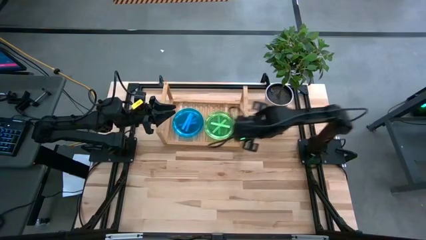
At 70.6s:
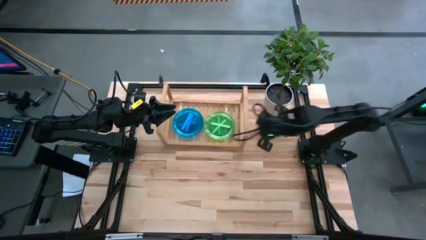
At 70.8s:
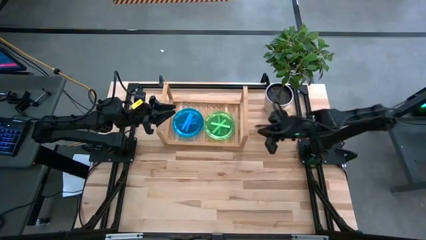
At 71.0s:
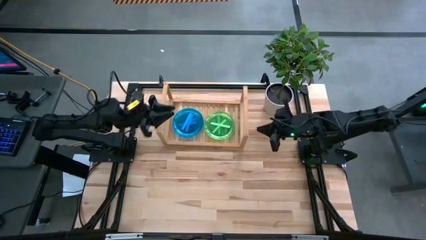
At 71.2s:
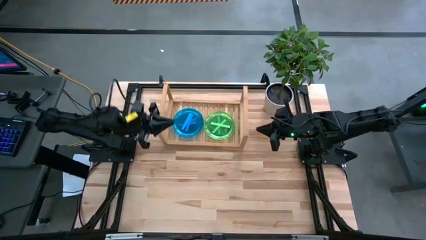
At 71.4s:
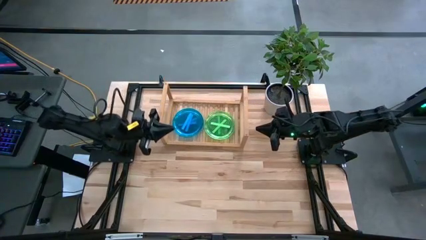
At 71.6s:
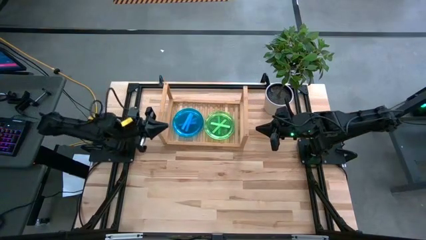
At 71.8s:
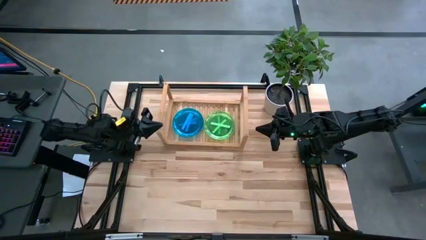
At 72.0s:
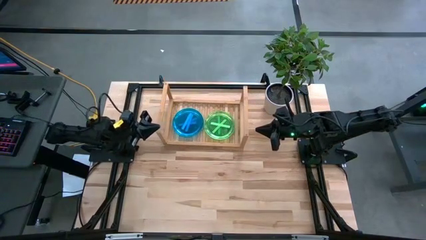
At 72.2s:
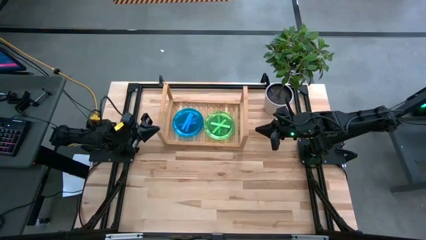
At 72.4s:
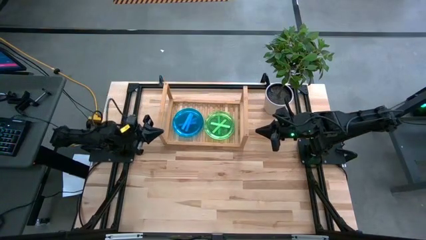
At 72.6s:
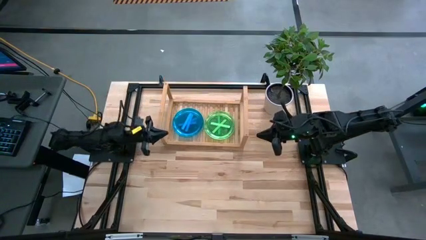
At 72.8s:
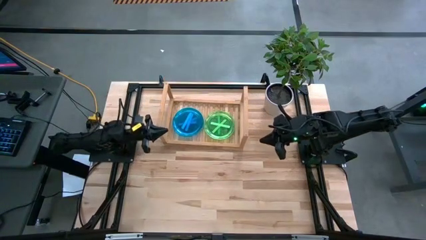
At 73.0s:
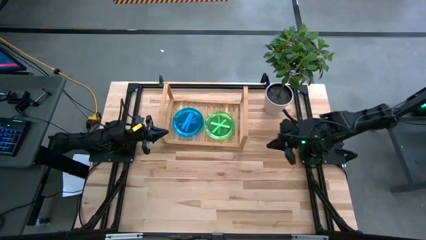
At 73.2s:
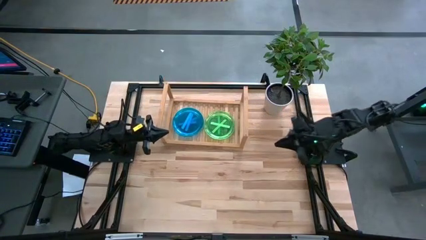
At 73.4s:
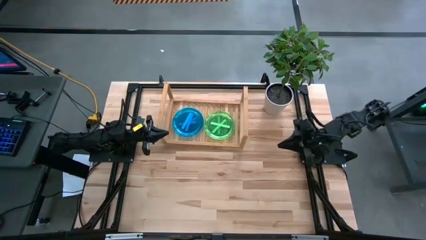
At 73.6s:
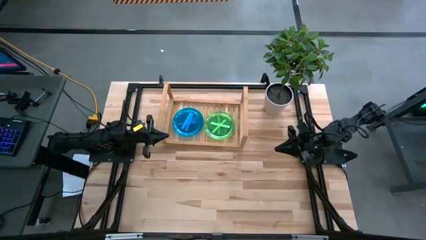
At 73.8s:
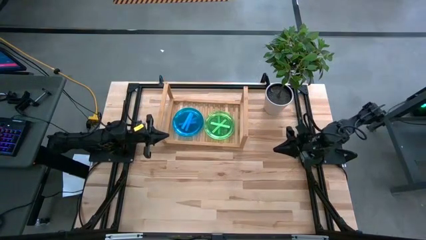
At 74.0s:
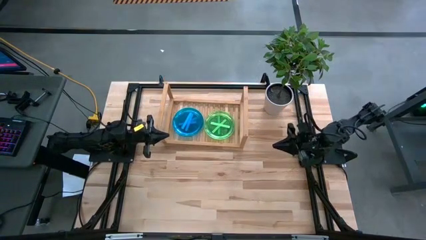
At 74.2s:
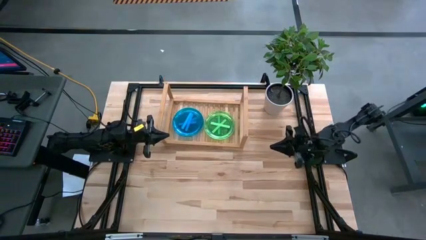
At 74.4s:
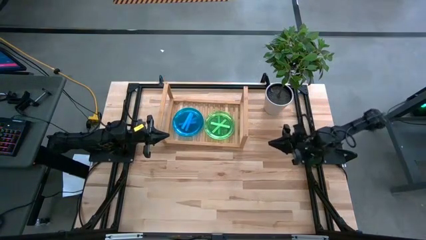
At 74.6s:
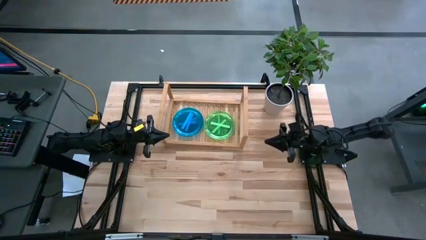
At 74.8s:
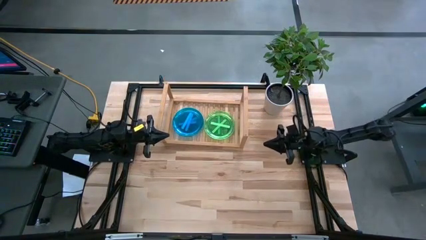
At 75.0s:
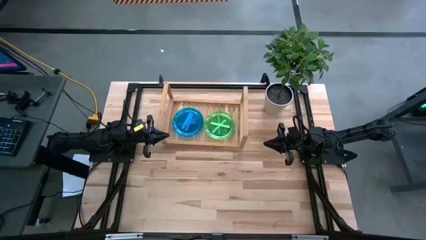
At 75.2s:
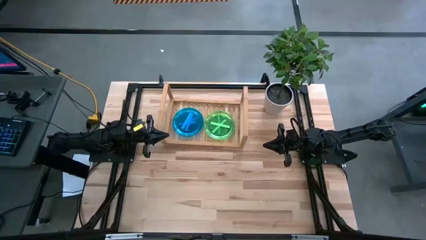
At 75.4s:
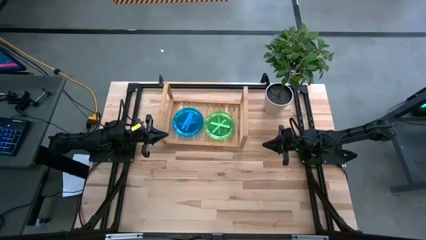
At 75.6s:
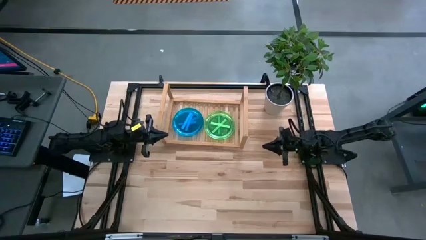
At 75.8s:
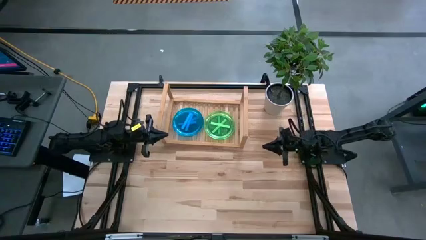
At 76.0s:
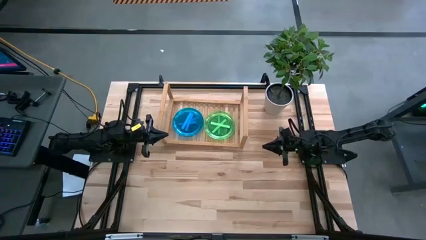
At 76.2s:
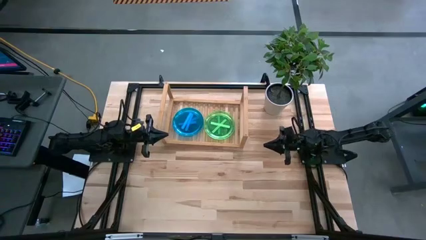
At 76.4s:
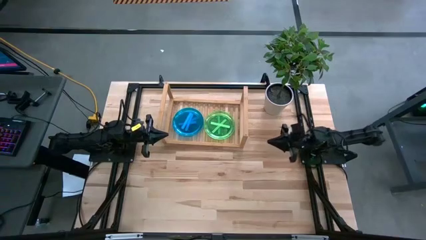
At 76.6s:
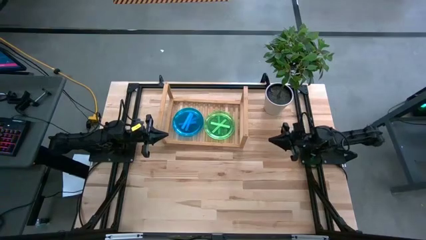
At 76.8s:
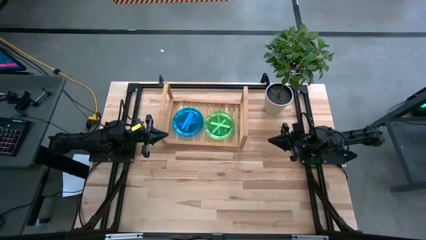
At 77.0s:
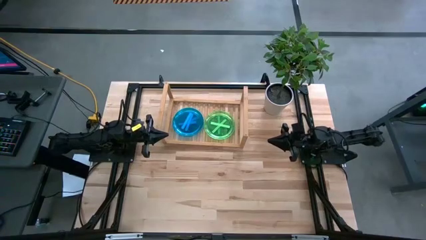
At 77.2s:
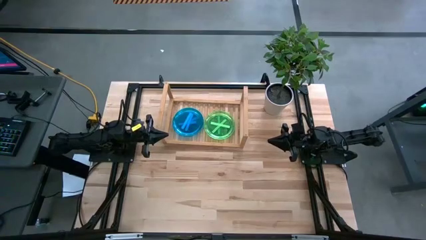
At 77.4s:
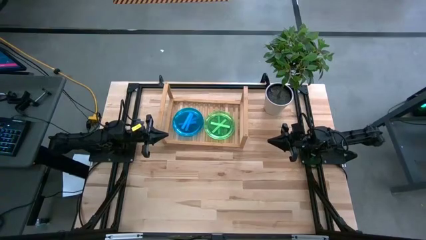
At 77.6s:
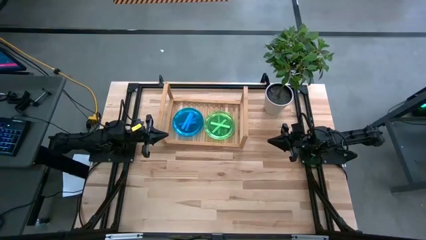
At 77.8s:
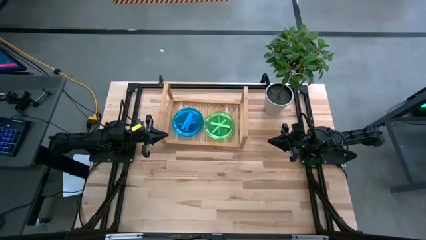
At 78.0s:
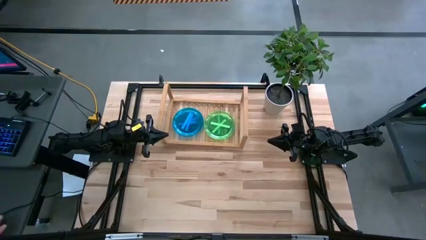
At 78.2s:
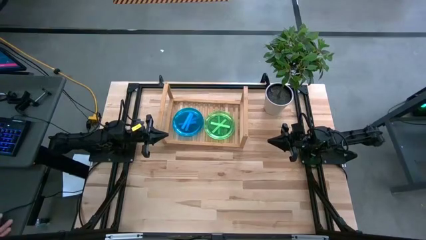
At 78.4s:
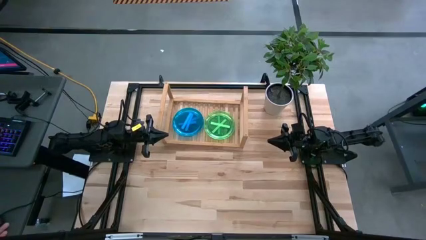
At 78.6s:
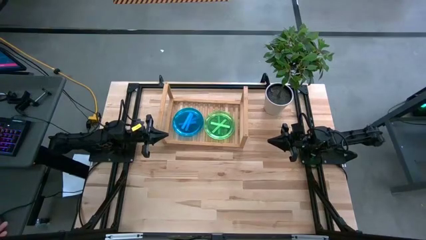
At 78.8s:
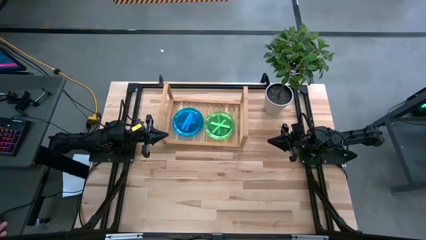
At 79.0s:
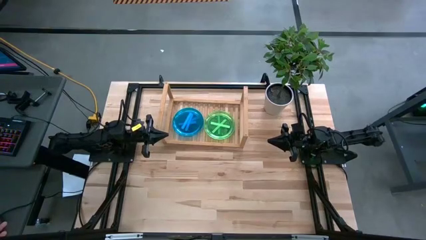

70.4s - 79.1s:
Task: Place and stack plates onto a shelf
Return to Home Position

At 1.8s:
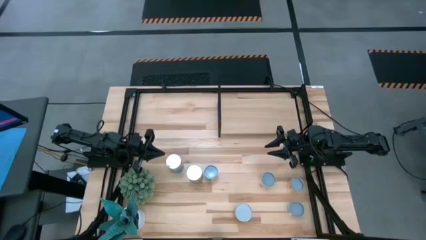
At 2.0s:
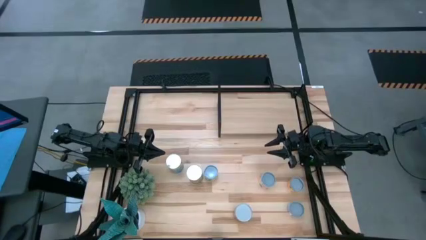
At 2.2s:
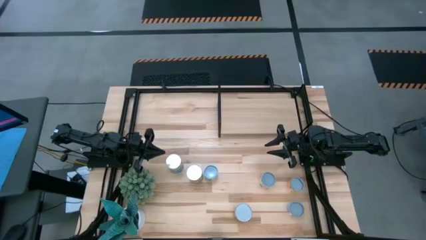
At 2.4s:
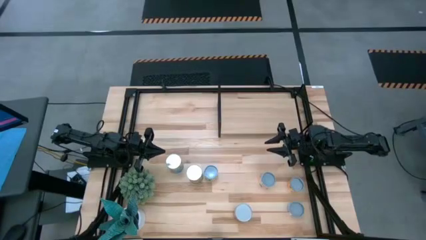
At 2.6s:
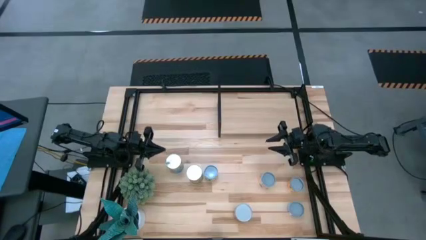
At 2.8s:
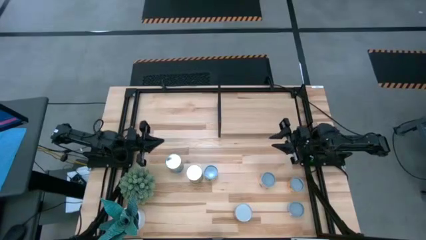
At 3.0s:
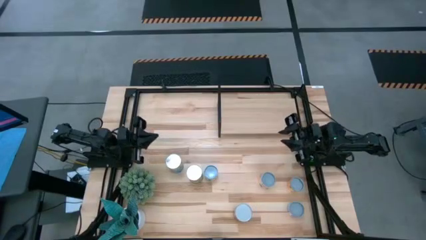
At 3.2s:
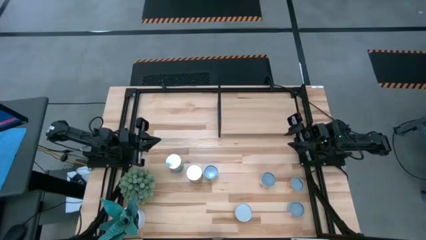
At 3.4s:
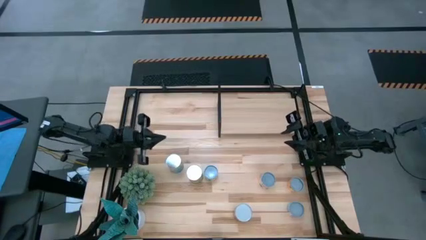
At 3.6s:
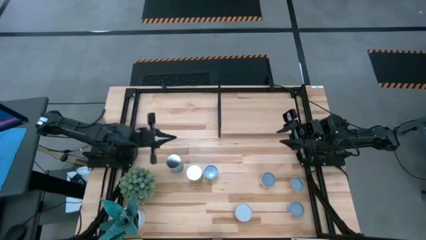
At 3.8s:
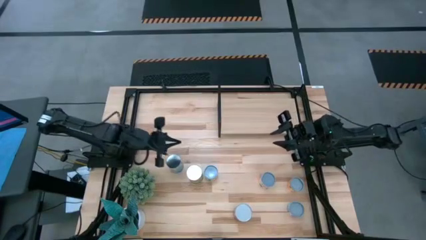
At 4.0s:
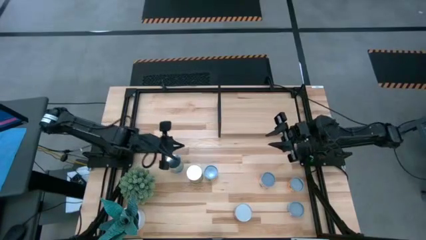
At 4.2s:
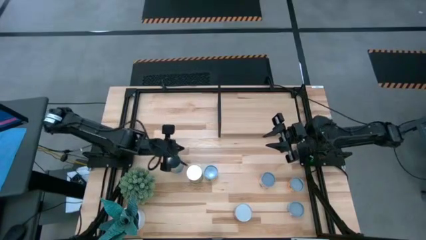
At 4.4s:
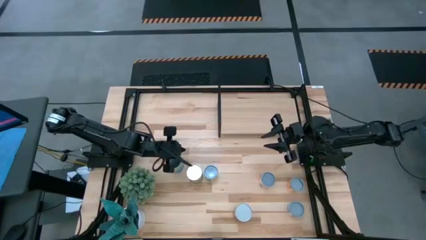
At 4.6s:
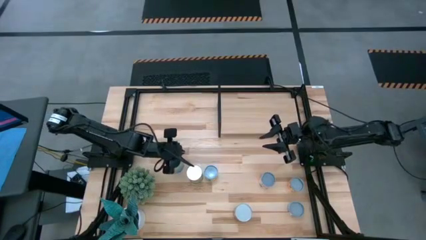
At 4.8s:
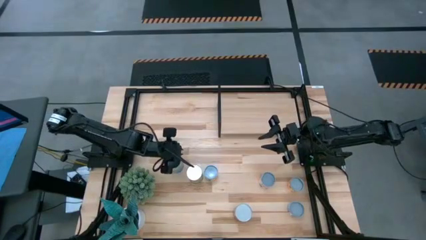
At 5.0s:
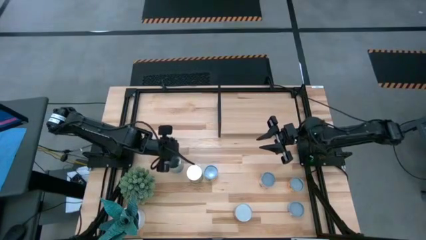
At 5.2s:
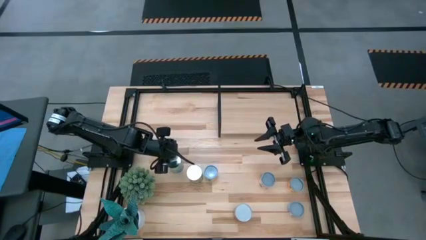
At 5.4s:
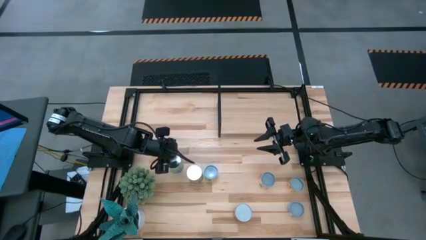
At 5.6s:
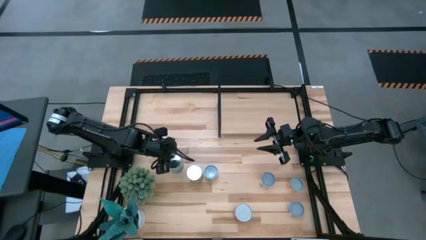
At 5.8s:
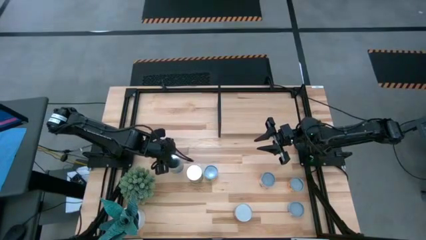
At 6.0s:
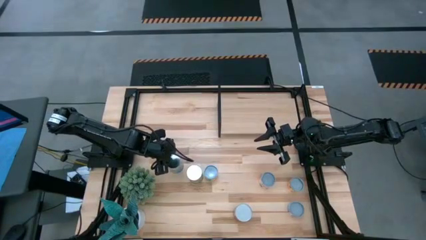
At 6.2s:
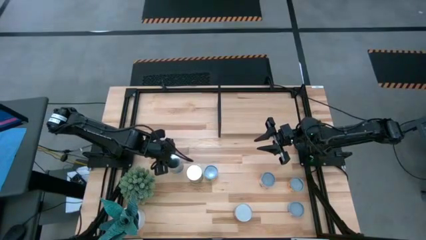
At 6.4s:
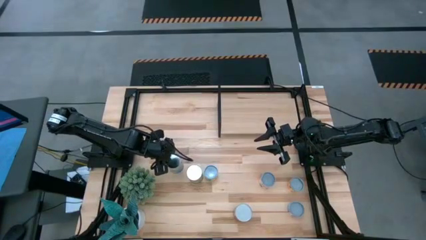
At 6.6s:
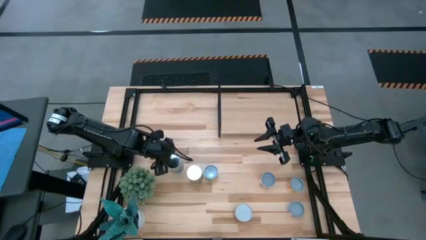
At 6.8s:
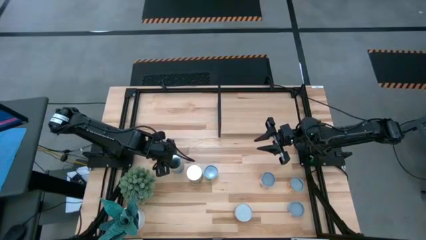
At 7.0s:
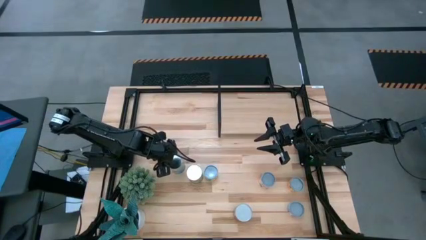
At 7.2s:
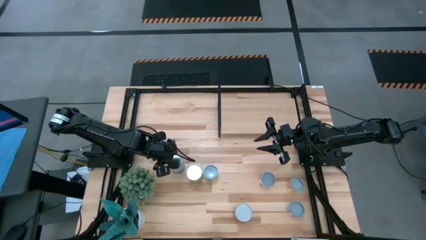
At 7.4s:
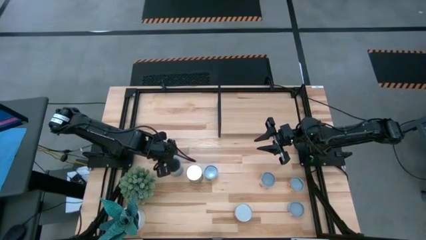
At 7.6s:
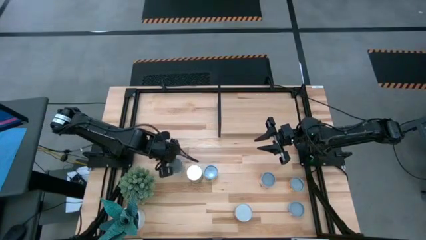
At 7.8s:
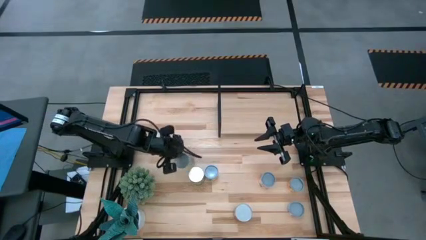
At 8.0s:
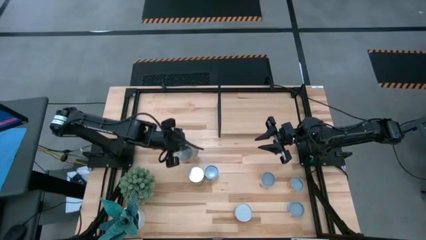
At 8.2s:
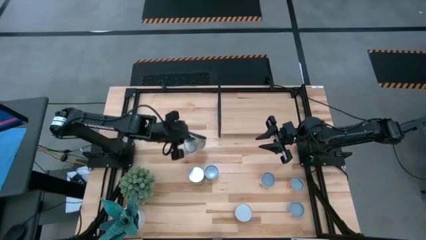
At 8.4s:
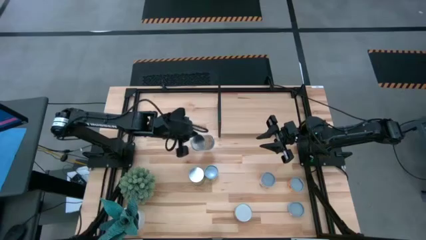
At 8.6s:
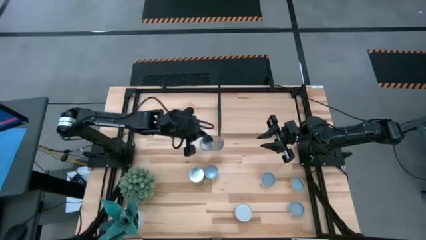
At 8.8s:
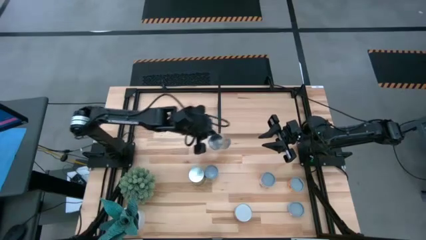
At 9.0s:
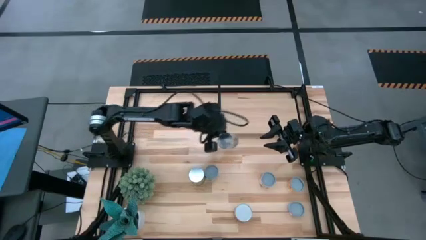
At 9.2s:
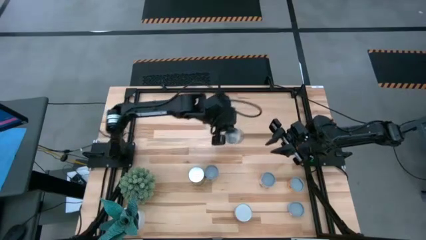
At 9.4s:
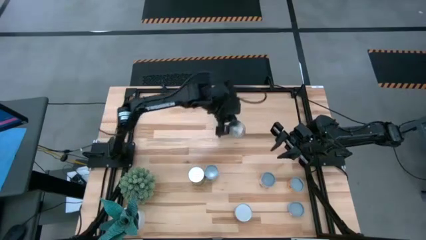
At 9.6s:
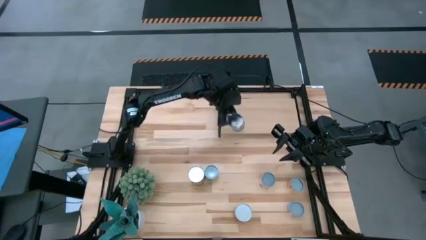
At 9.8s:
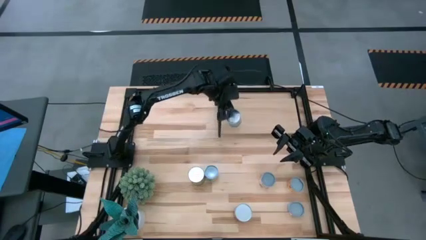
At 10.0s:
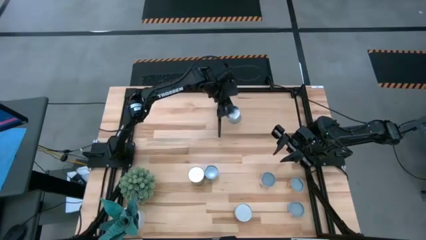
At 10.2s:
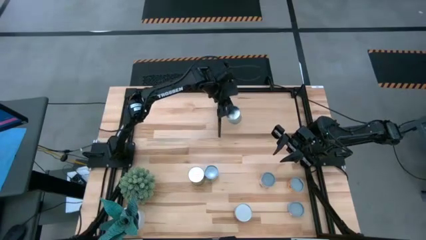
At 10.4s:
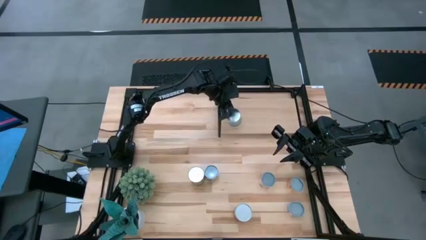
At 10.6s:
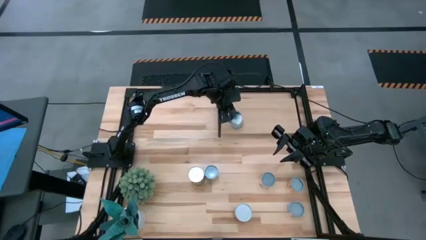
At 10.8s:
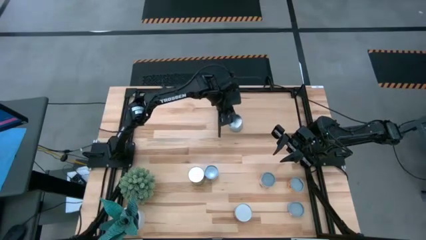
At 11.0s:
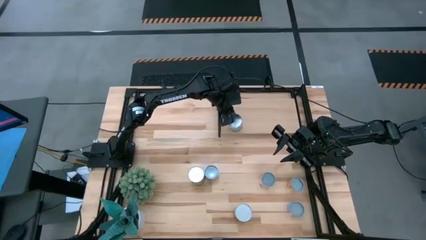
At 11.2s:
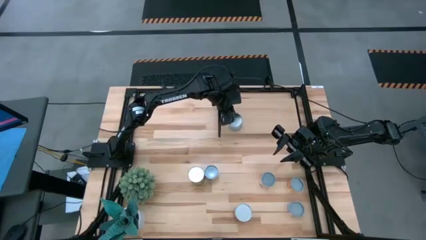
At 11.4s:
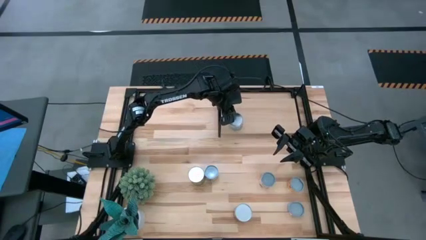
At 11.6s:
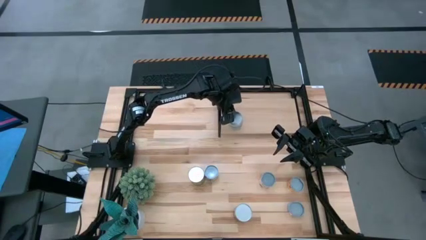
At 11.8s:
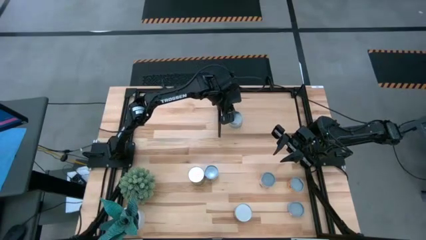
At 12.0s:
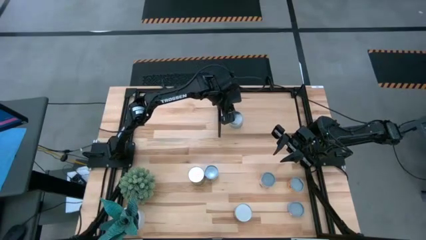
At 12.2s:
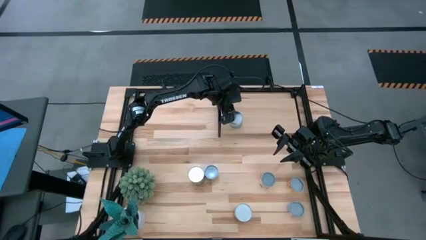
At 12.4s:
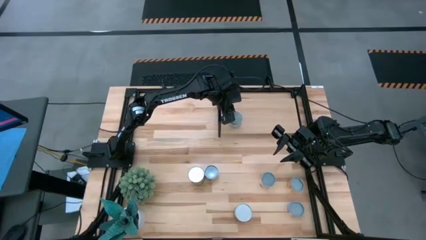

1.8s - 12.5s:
Task: Pick and place cans onto a shelf
Put the canned tomatoes on the shelf
